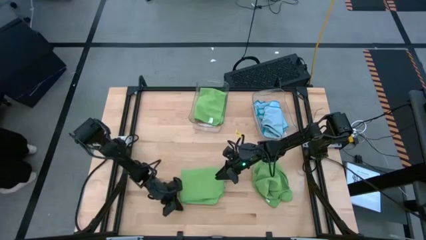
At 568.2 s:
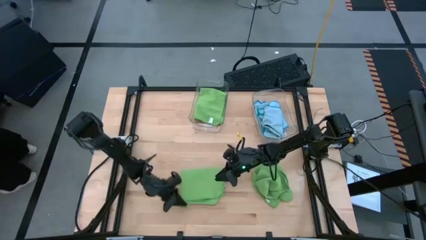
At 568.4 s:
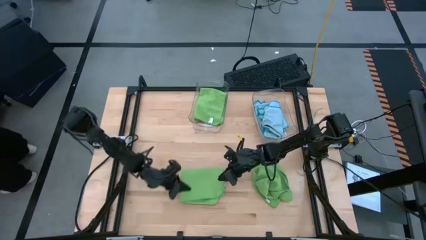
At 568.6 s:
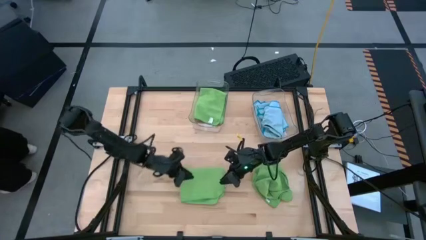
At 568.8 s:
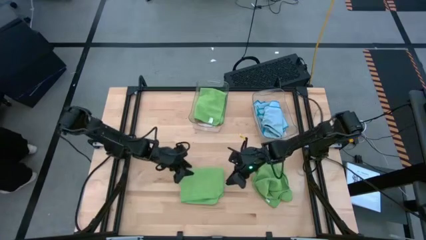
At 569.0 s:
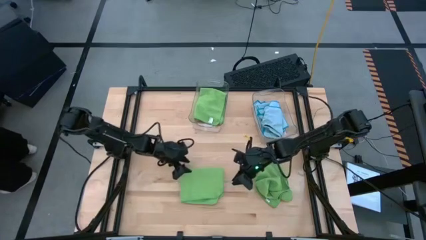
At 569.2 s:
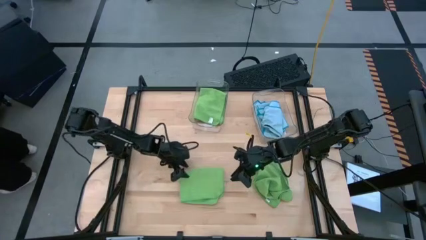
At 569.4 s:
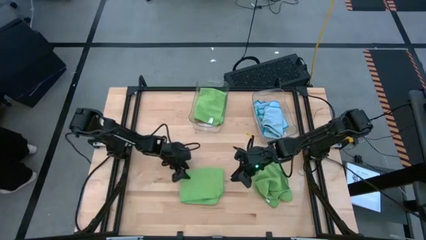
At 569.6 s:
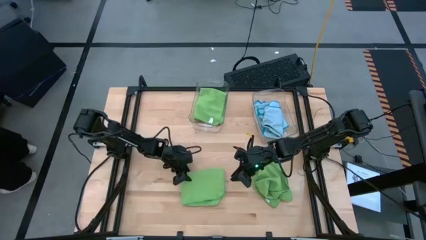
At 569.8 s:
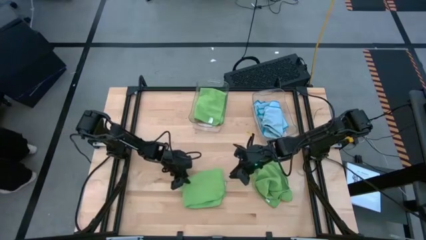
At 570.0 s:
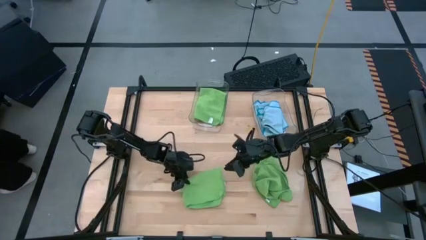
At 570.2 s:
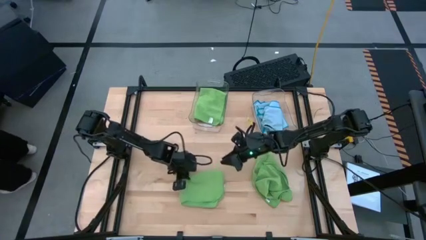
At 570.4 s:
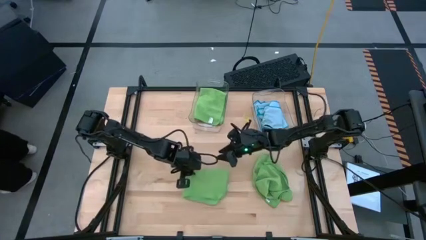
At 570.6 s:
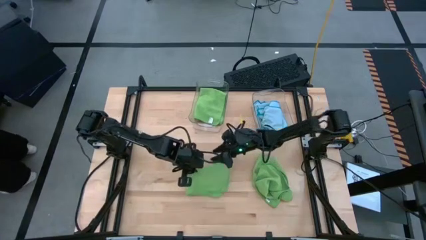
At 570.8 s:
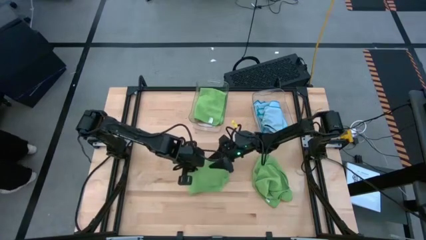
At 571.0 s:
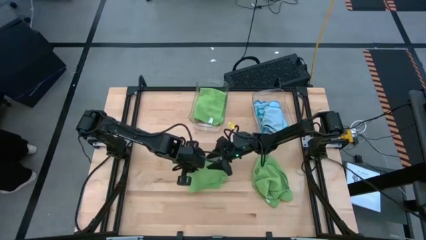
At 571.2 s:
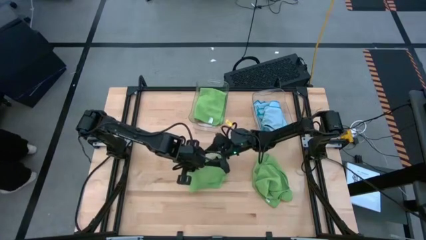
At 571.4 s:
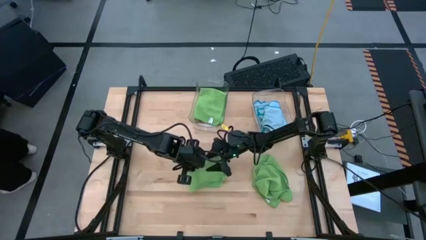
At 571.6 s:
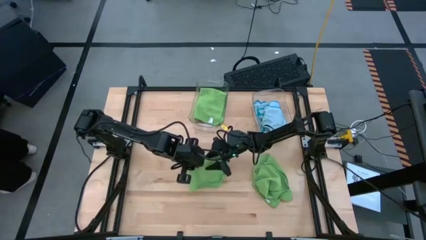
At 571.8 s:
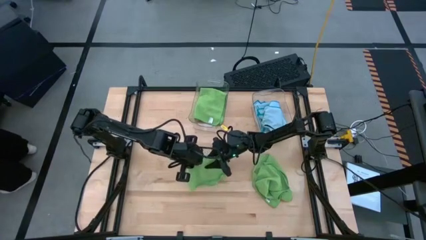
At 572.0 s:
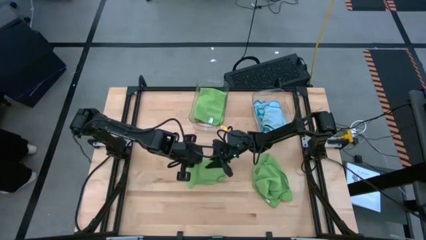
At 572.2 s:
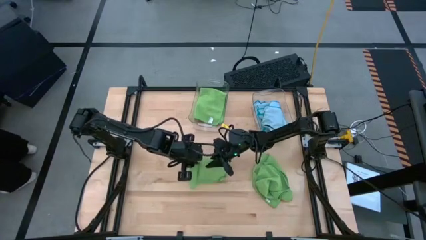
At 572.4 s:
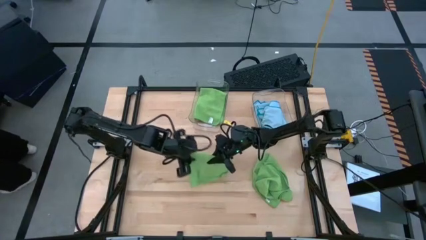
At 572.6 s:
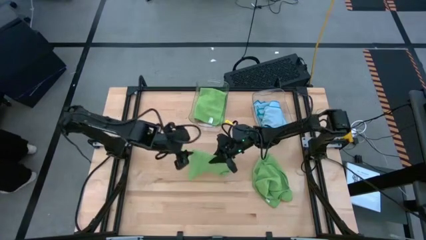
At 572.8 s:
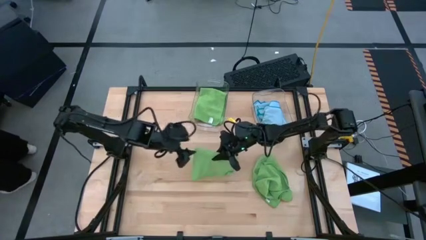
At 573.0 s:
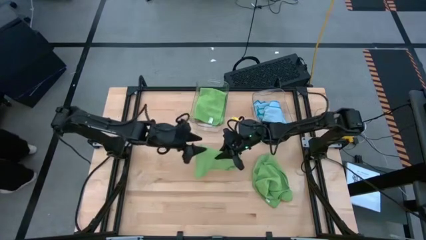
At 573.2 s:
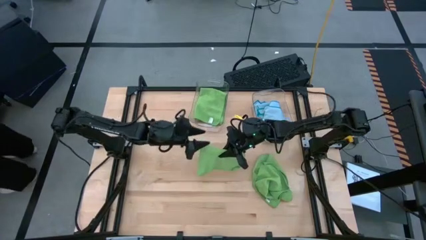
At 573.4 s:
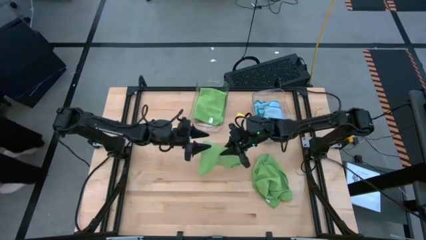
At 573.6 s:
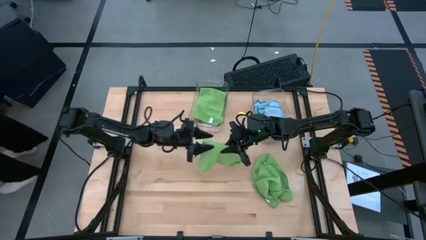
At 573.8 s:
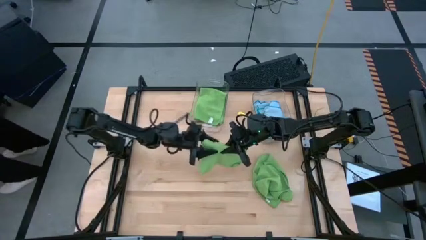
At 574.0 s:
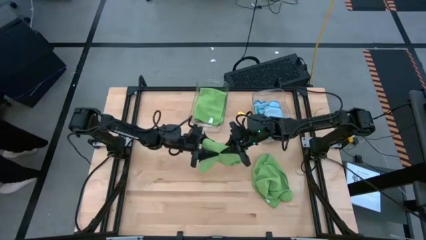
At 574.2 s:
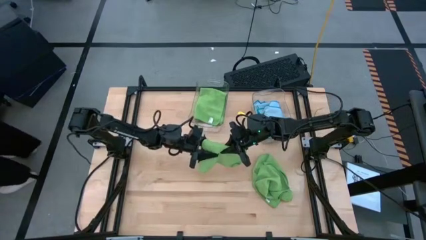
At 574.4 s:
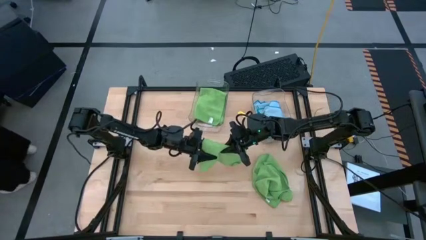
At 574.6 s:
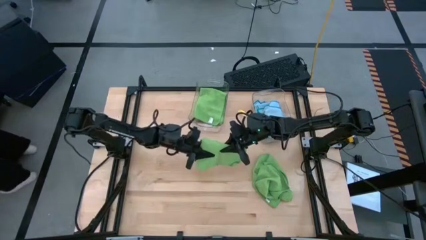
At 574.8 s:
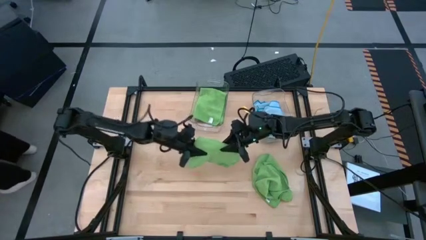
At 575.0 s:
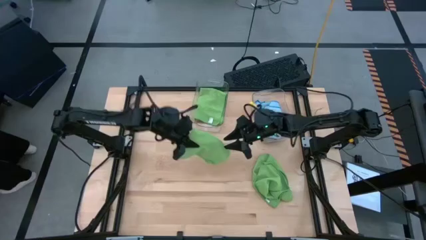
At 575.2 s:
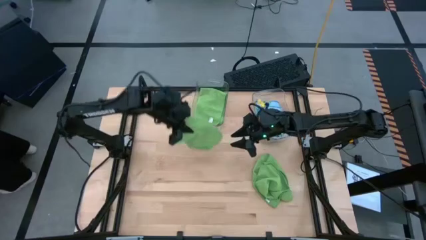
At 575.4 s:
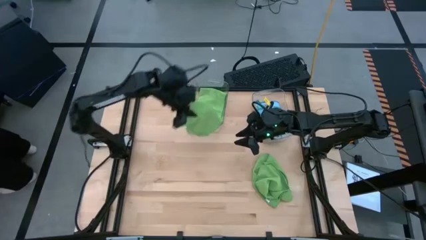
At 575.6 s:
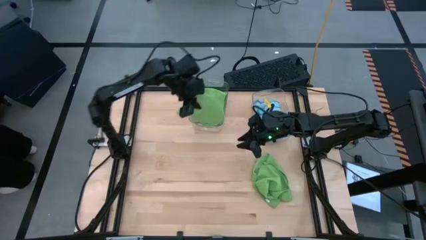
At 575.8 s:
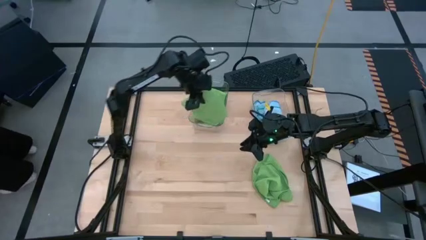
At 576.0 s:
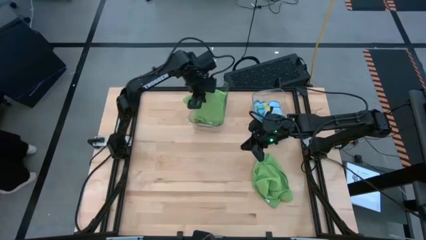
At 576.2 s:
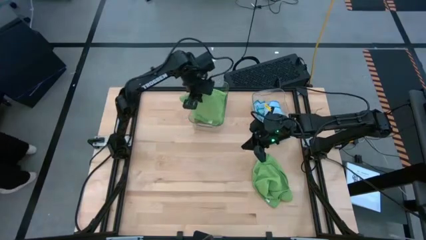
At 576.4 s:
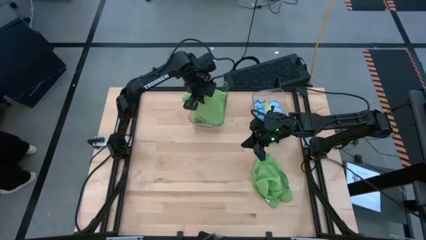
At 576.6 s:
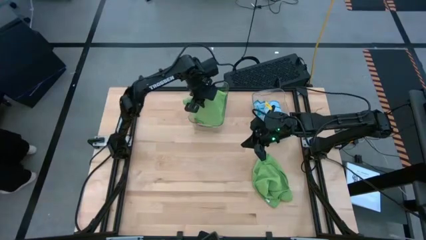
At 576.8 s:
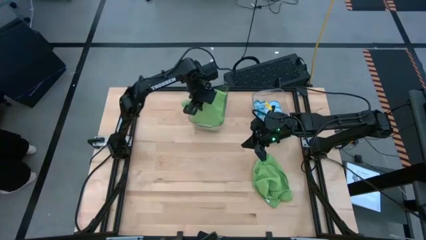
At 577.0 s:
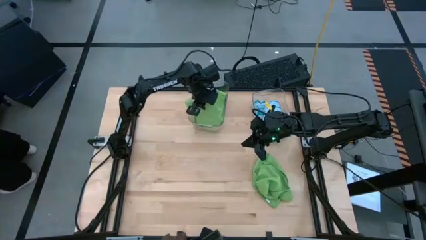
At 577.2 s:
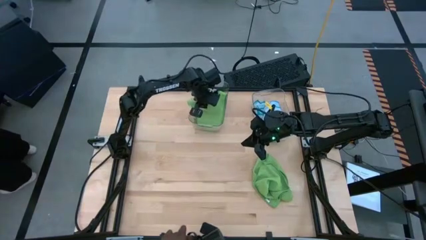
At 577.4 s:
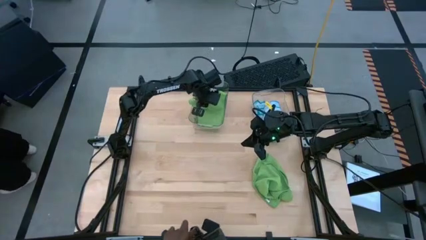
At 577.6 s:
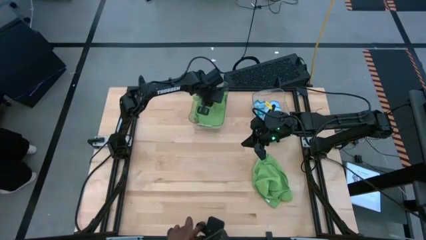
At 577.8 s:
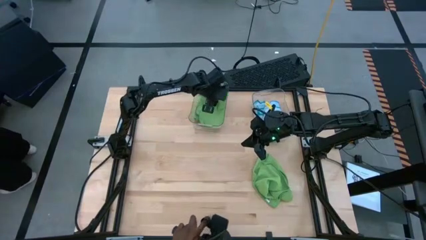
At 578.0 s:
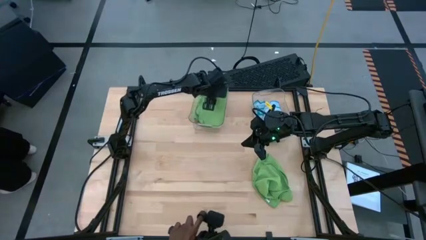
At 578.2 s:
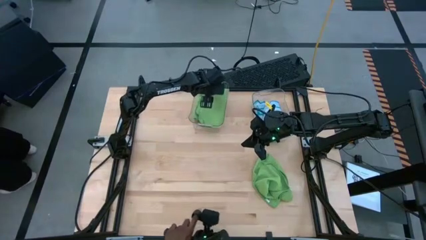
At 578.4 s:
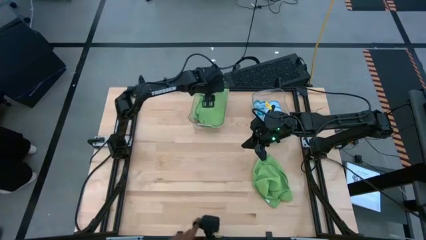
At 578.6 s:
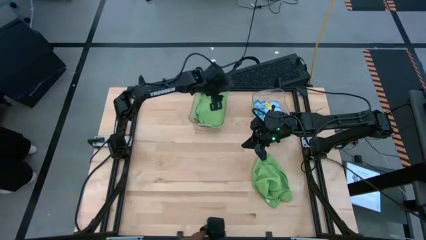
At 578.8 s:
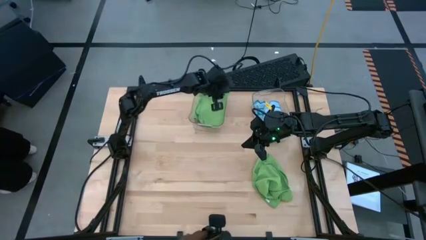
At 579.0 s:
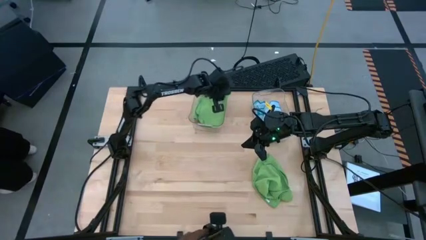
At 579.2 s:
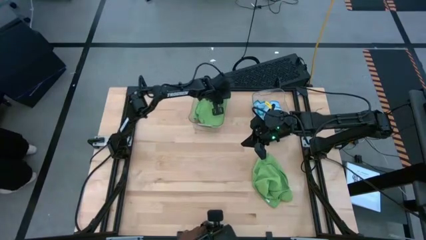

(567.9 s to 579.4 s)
Task: Fold microfiber towels
Put the right green microfiber towel into the left transparent bin

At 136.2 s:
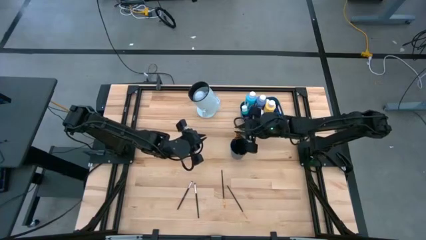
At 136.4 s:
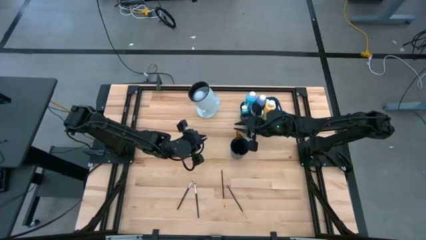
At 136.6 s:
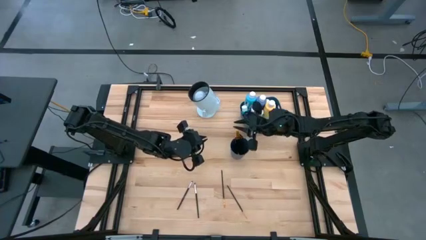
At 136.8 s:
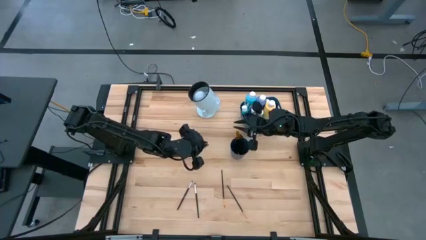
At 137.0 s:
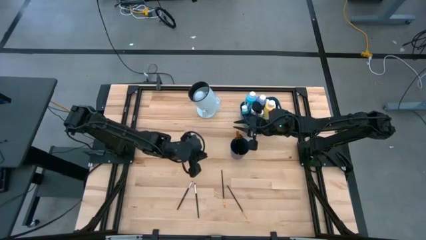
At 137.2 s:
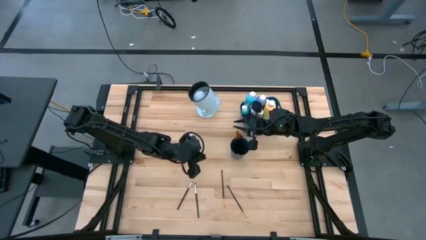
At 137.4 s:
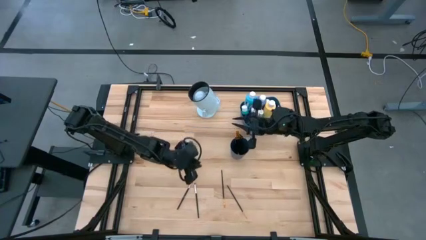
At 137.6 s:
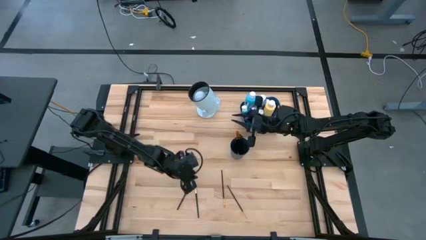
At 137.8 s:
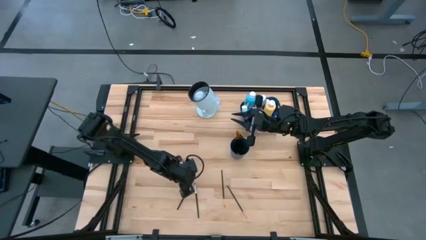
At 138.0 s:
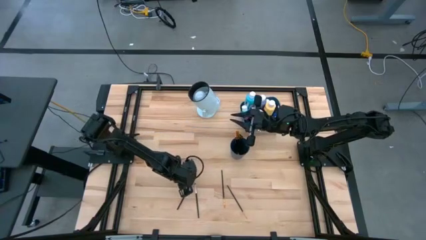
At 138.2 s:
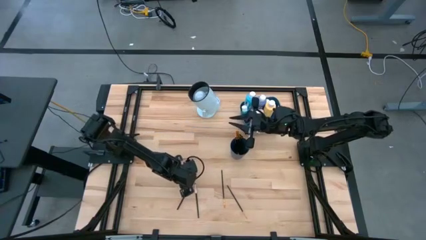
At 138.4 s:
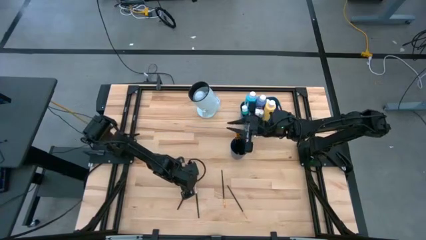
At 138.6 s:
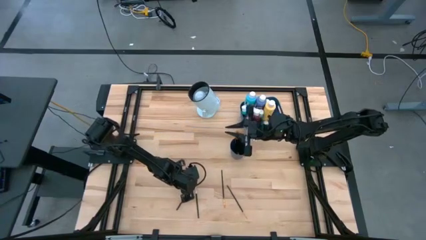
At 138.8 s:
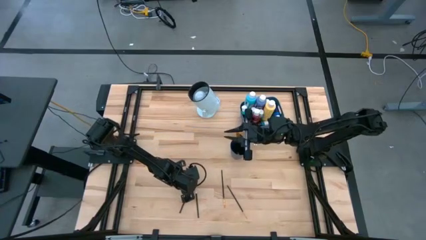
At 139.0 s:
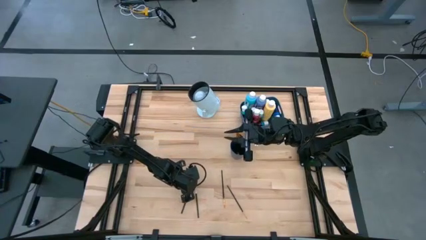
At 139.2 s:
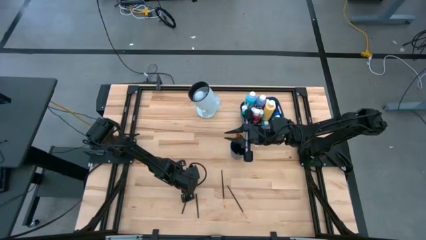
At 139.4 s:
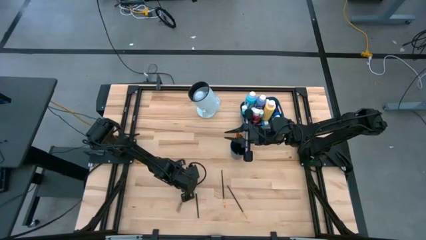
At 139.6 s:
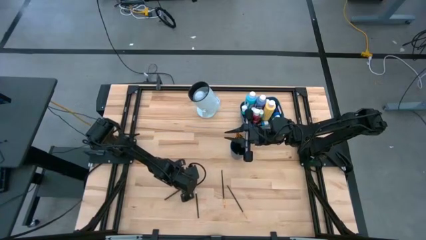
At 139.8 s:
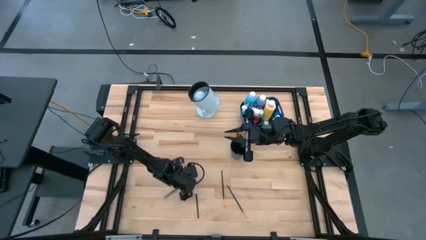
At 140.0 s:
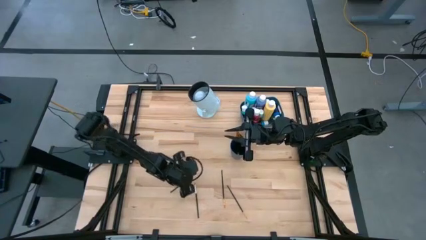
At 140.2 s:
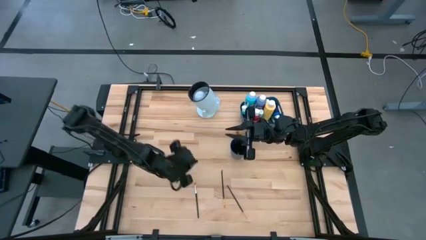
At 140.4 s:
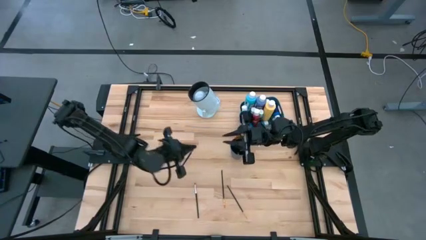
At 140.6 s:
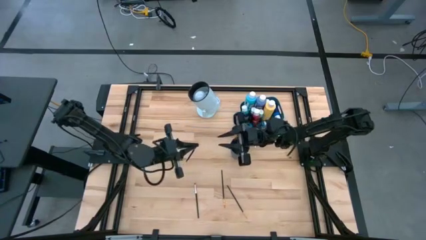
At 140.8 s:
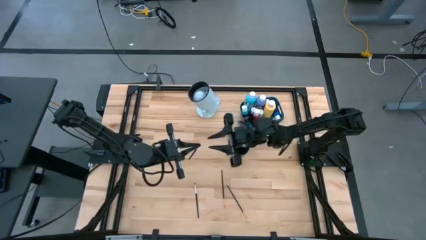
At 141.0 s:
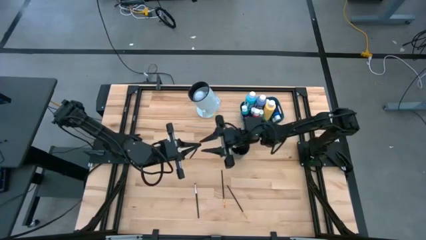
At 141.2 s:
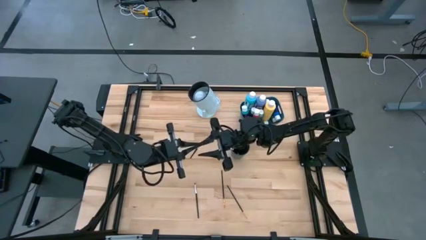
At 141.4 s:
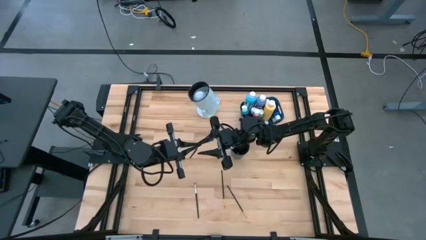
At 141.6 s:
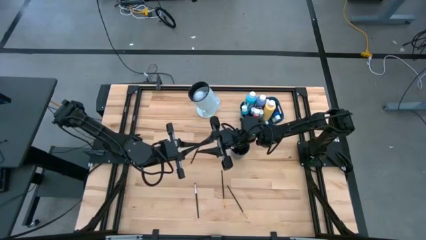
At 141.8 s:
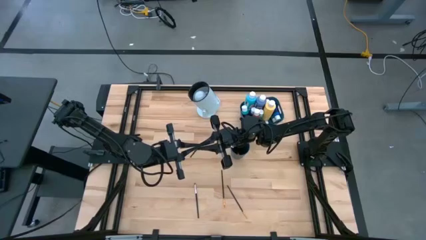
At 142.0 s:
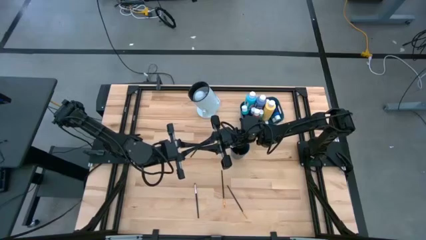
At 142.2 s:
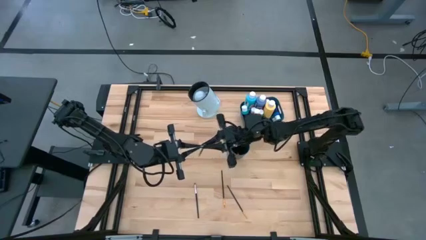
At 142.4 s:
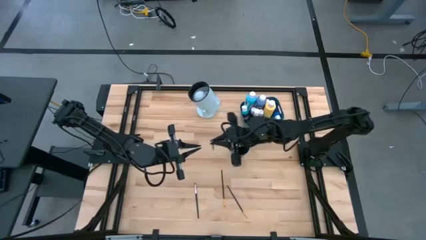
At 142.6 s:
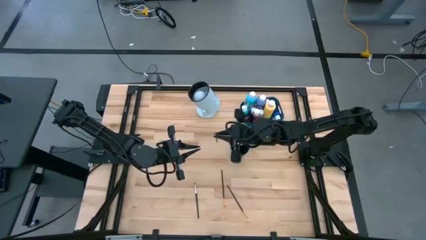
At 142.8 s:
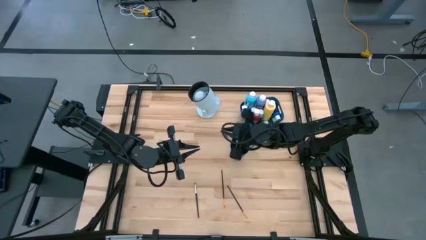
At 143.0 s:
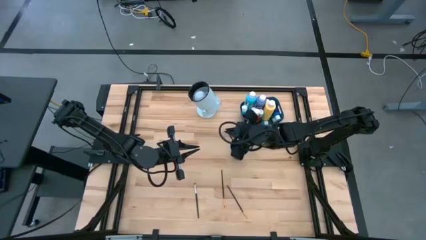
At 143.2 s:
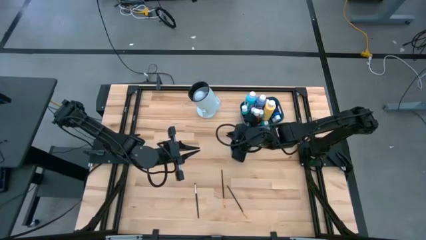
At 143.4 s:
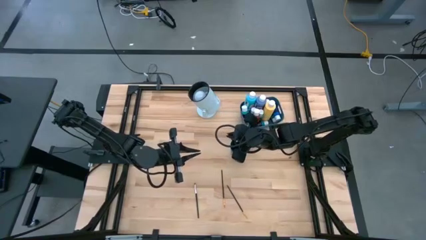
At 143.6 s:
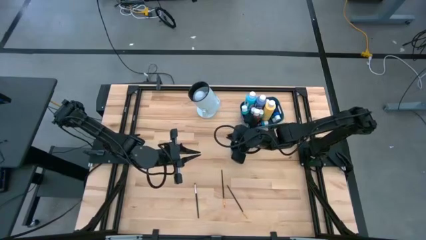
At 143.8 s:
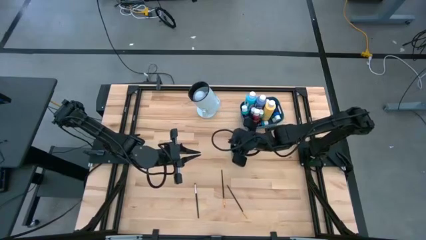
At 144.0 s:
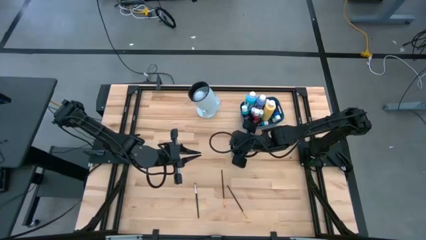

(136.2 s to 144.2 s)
Task: Pick & Place Paint Supplies
Put the silver paintbrush into the blue cup
